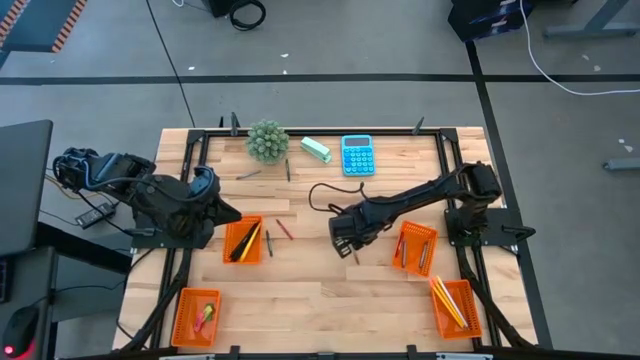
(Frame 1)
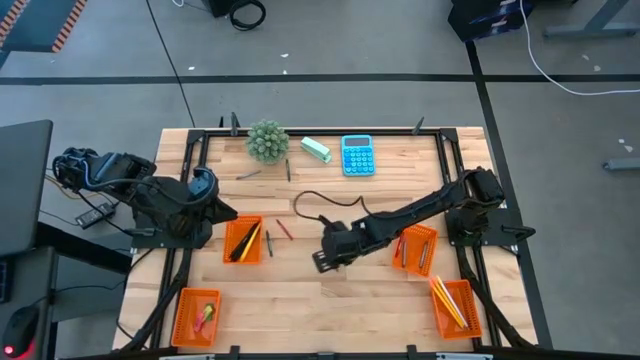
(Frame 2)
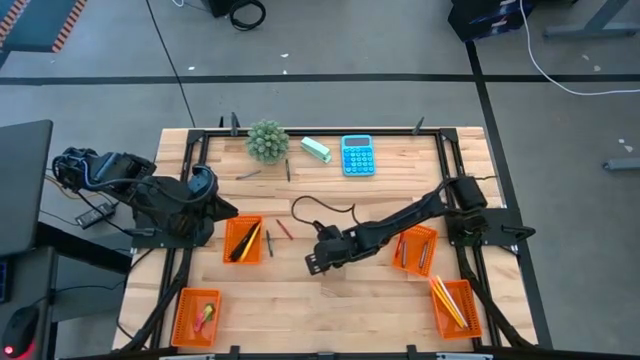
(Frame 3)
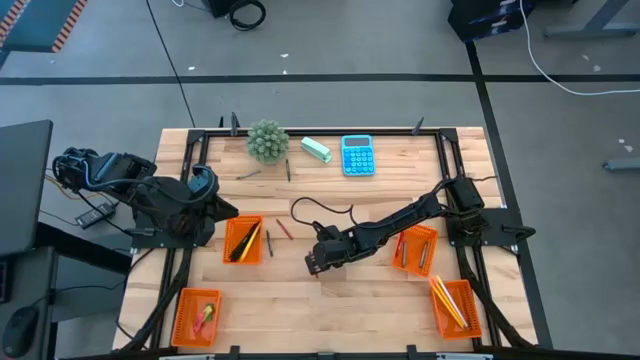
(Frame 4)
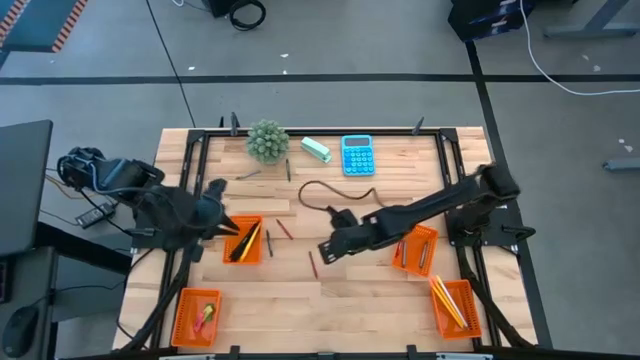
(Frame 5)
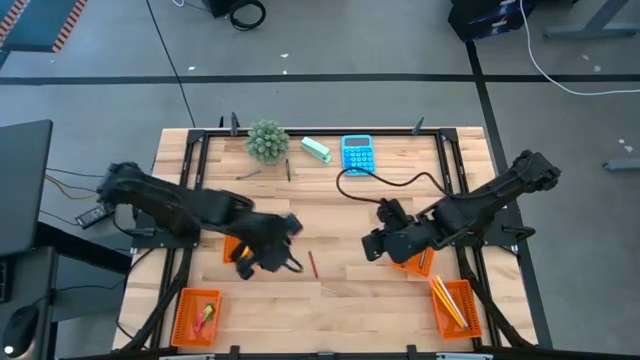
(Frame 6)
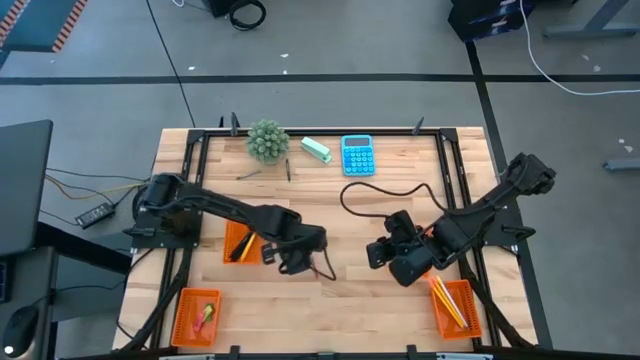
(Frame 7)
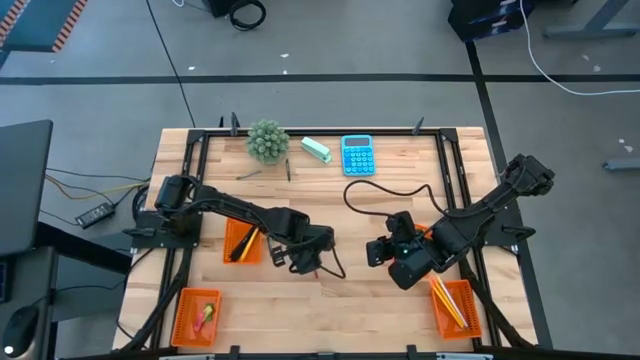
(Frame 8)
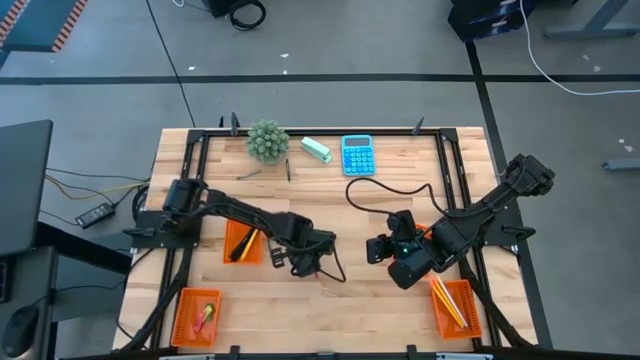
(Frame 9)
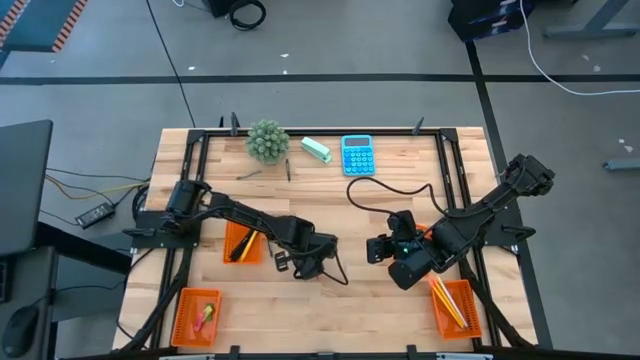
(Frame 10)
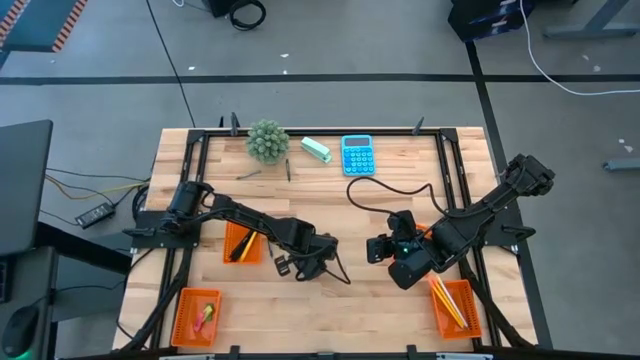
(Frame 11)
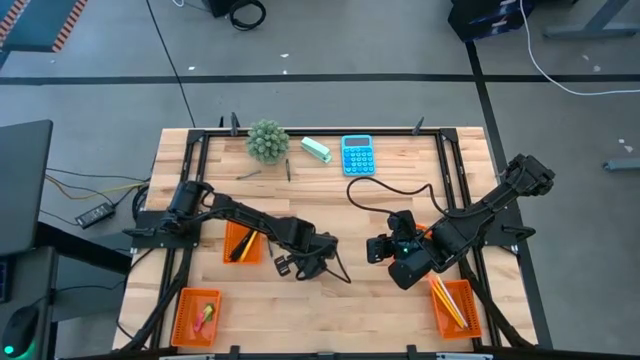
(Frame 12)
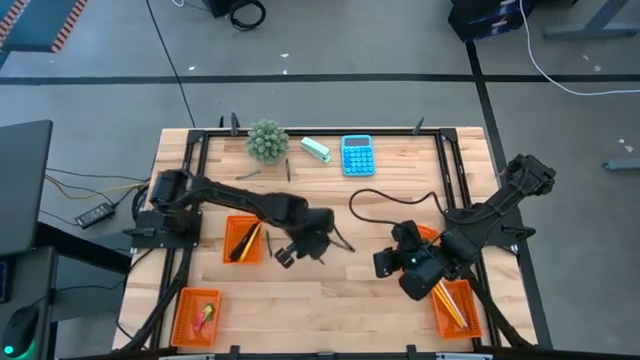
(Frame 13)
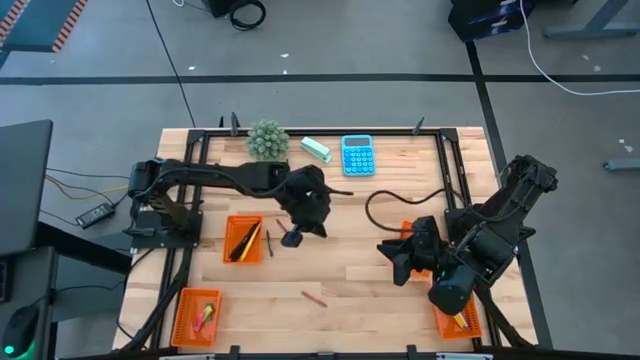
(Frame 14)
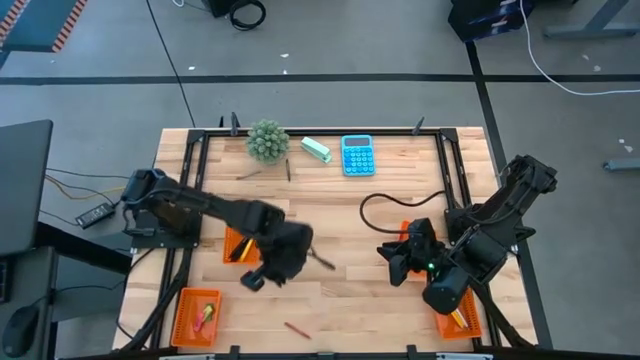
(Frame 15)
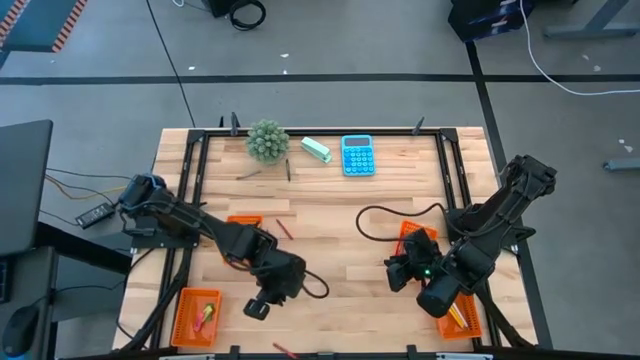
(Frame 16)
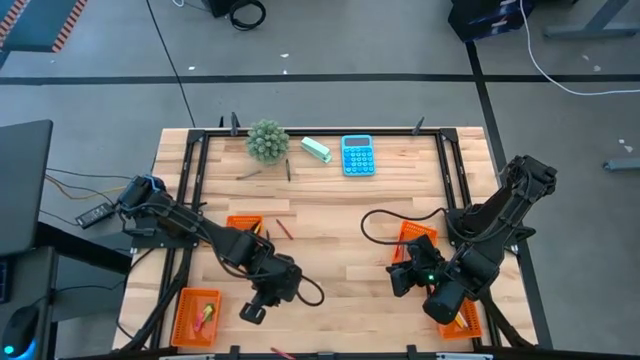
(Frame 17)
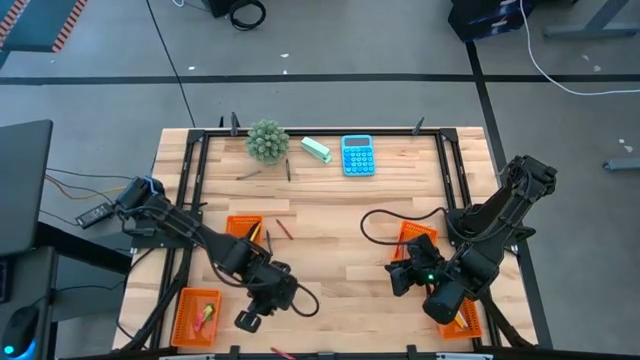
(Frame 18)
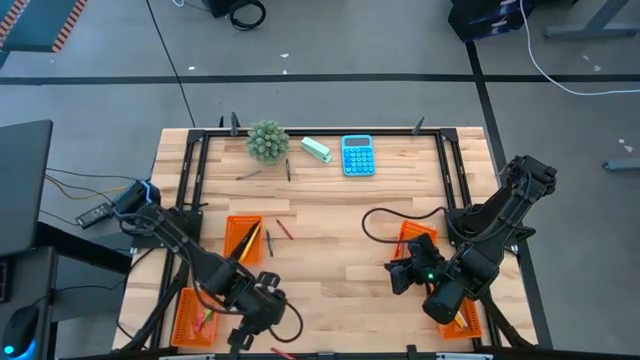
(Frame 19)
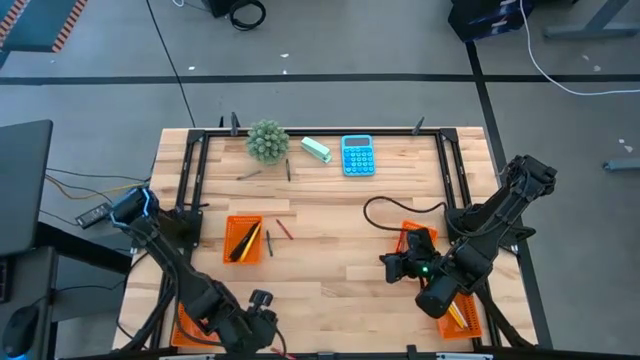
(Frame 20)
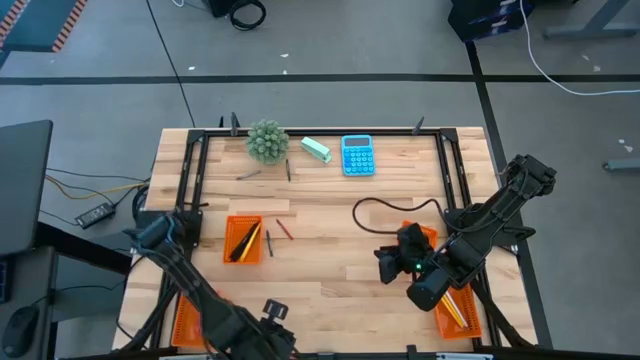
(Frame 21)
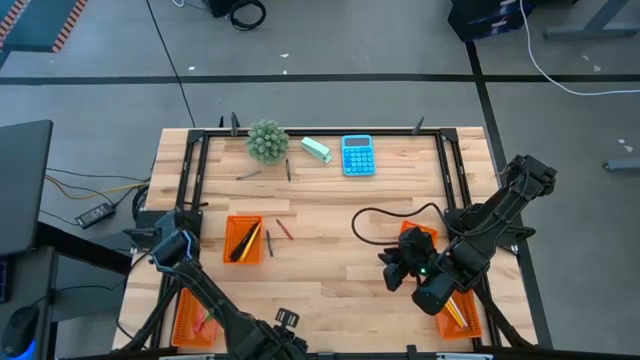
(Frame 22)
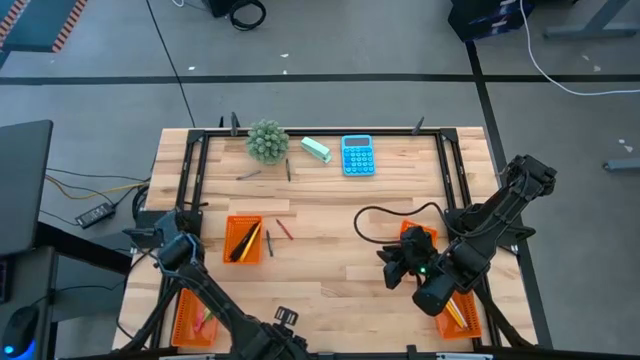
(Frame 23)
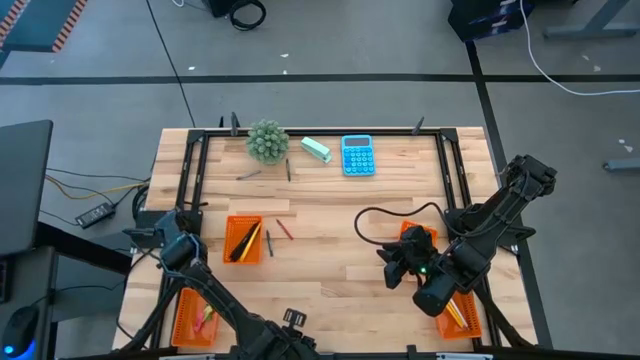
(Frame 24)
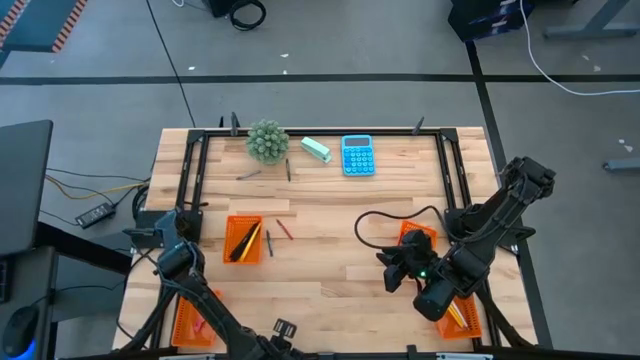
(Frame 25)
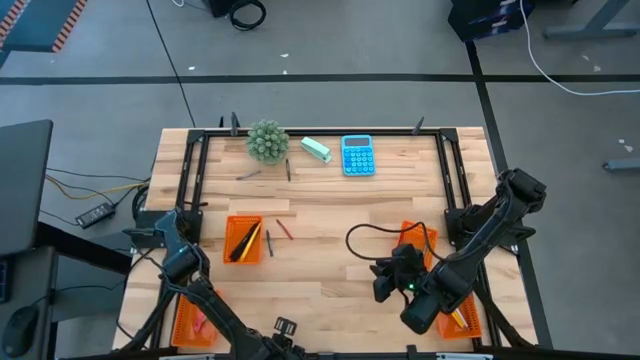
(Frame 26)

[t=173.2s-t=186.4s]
Task: Sort crayons/erasers/pens/pencils in bins
Put the bottom red crayon into the top right orange basket

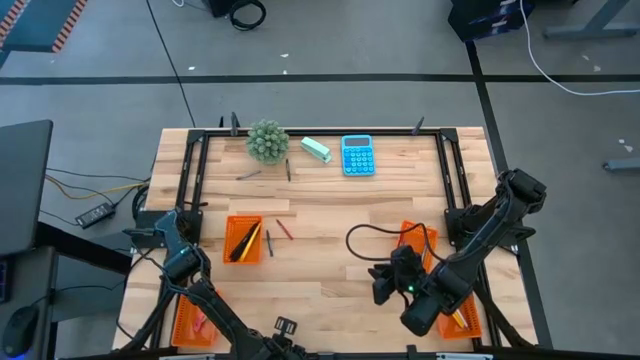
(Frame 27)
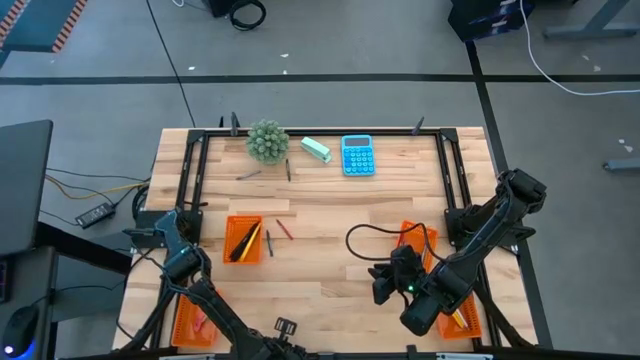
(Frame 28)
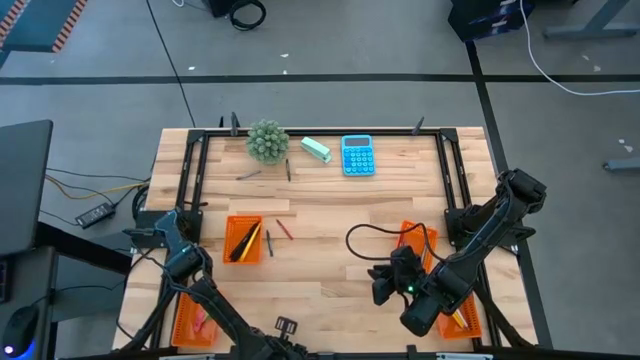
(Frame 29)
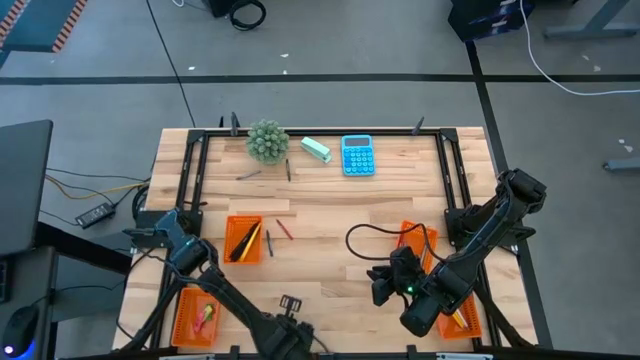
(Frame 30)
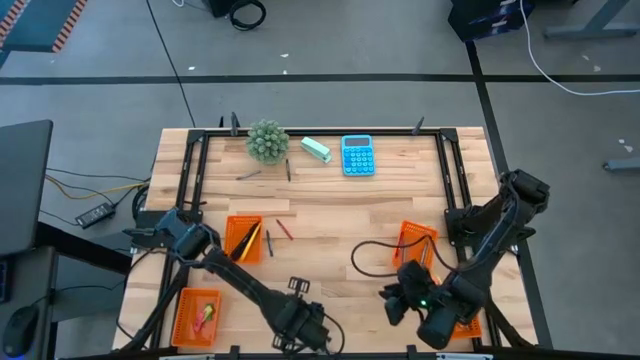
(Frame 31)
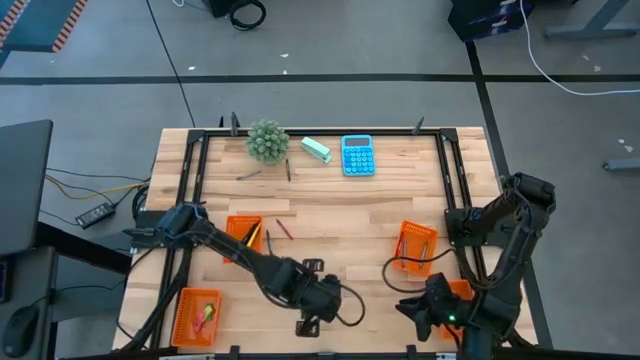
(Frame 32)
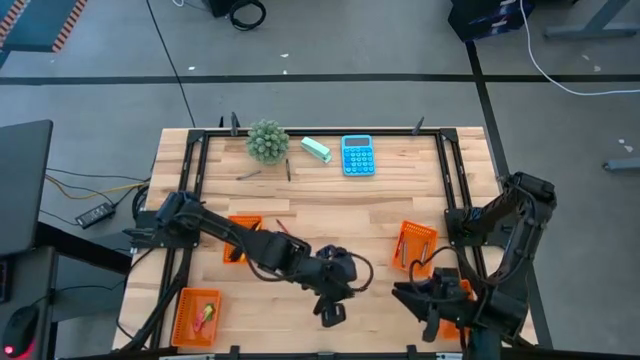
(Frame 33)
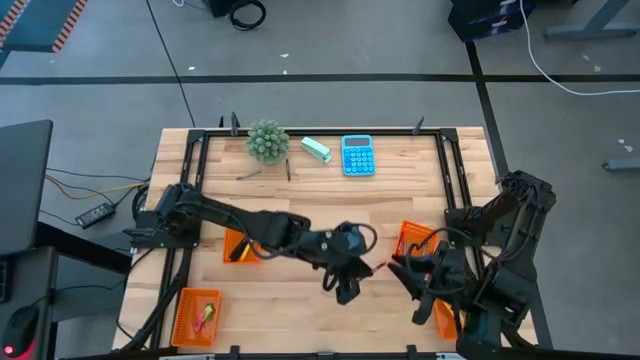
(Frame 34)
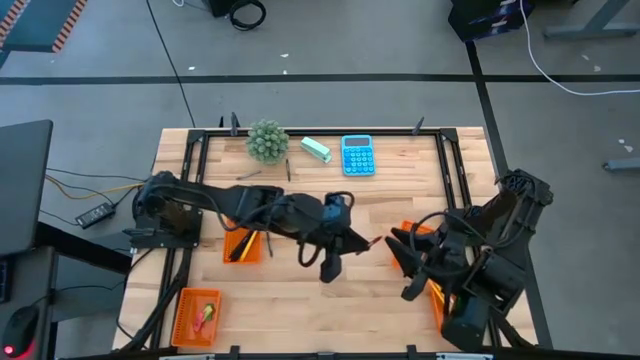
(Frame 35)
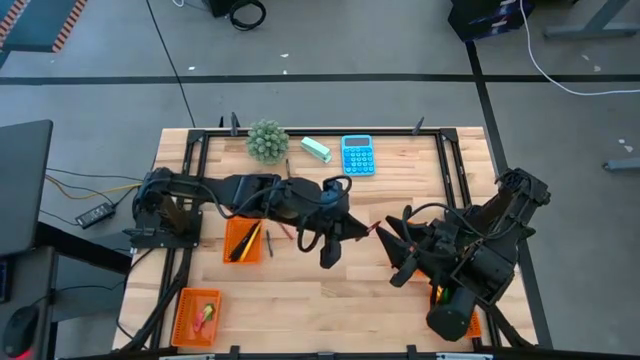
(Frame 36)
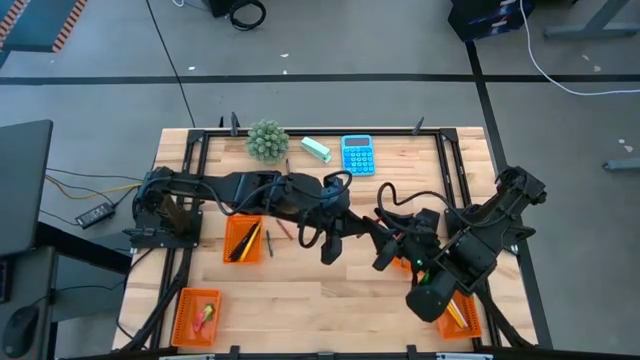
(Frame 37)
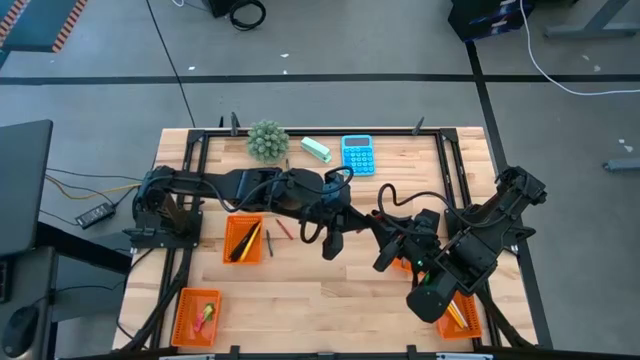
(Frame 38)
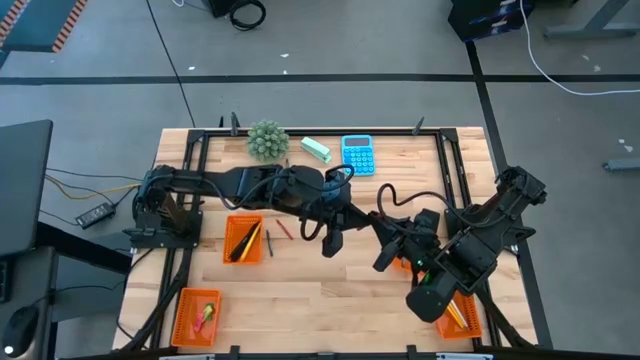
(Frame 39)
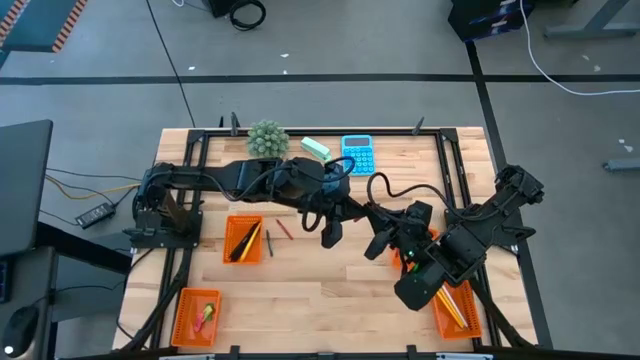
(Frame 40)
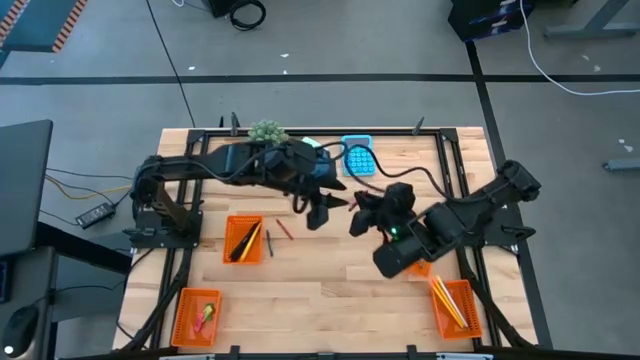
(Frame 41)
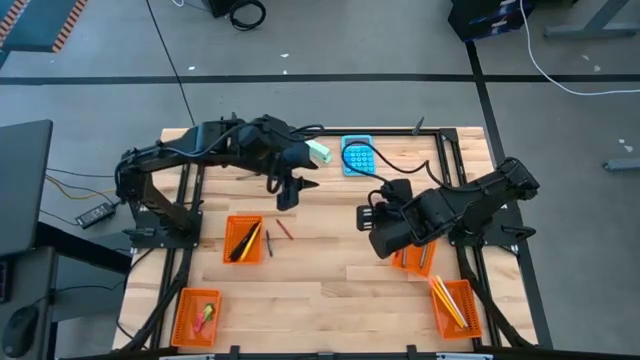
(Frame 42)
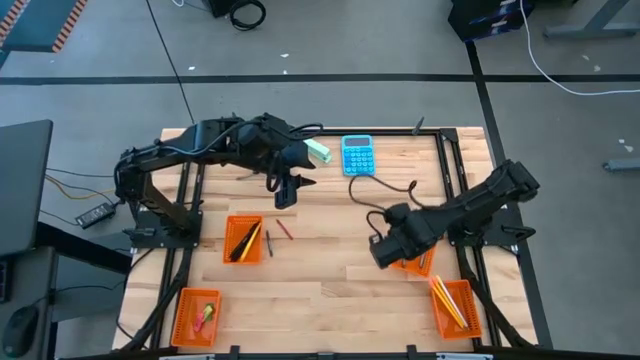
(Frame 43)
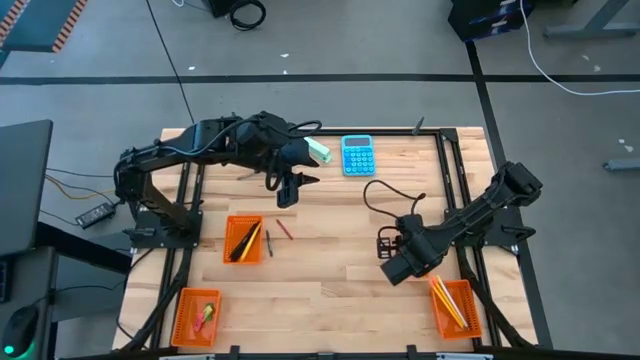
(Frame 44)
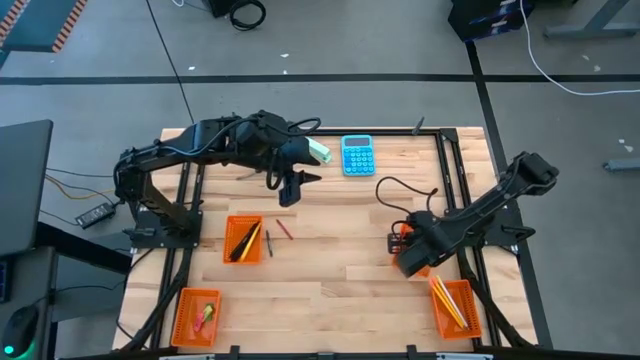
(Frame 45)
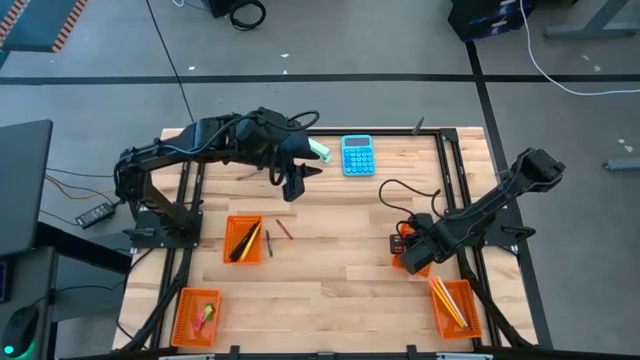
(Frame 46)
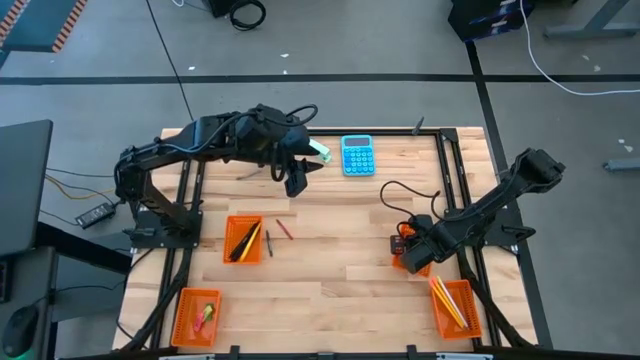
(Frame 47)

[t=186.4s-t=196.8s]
Put the bottom red crayon into the top right orange basket
